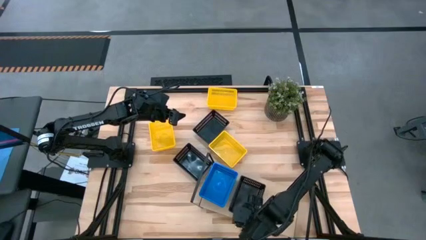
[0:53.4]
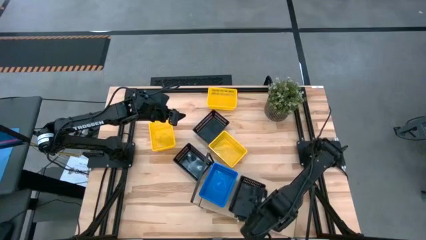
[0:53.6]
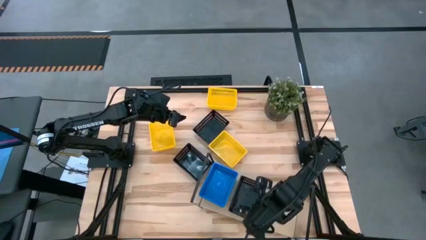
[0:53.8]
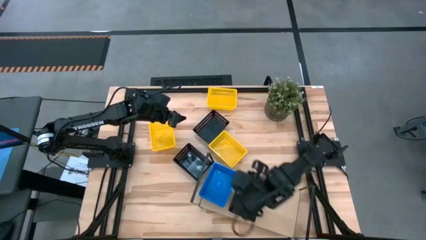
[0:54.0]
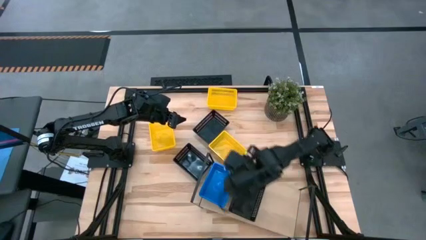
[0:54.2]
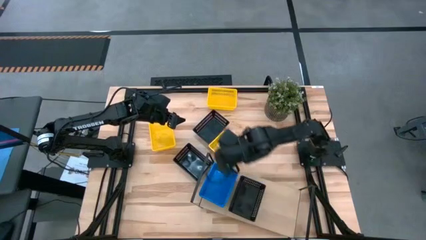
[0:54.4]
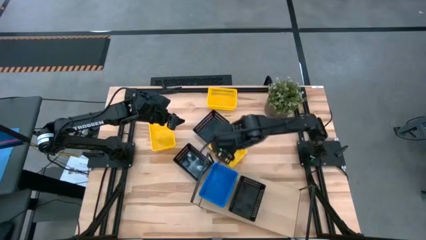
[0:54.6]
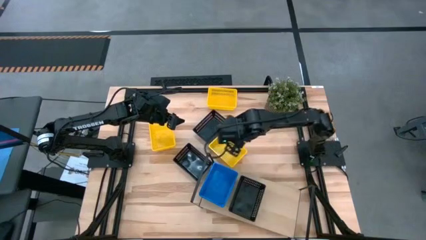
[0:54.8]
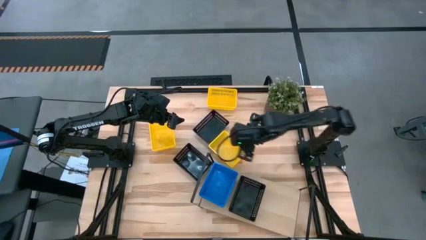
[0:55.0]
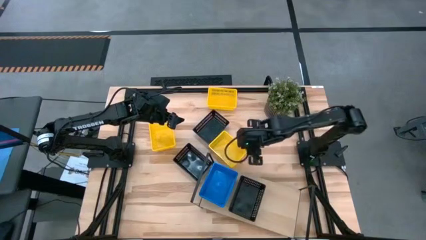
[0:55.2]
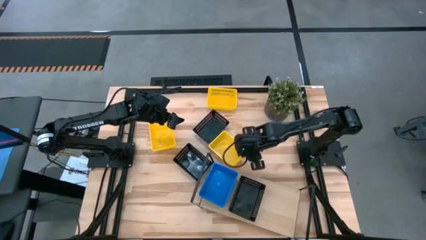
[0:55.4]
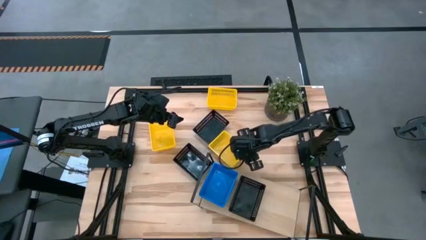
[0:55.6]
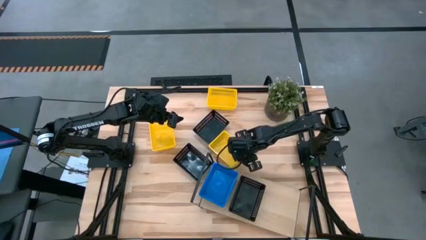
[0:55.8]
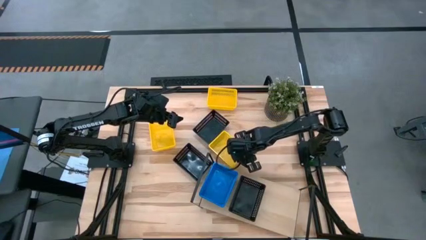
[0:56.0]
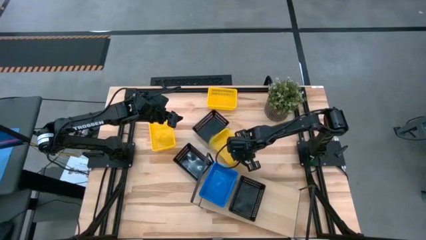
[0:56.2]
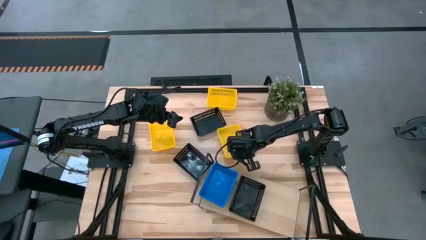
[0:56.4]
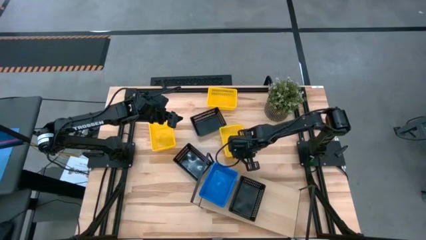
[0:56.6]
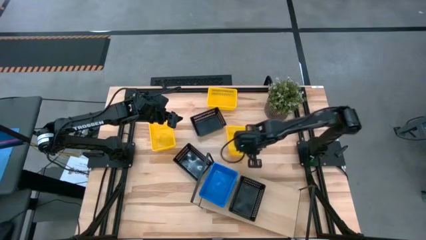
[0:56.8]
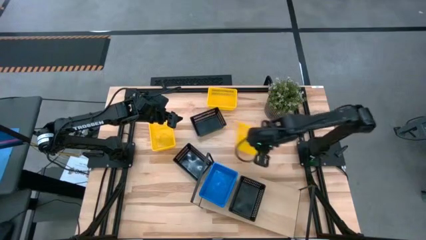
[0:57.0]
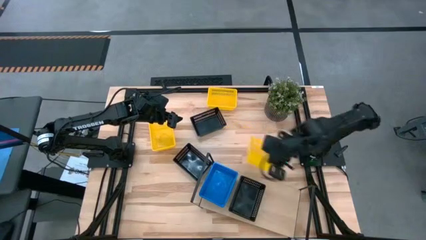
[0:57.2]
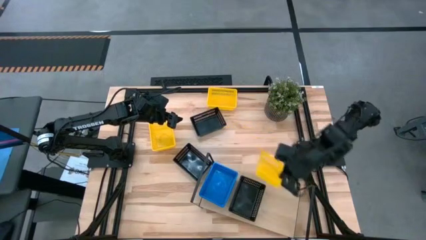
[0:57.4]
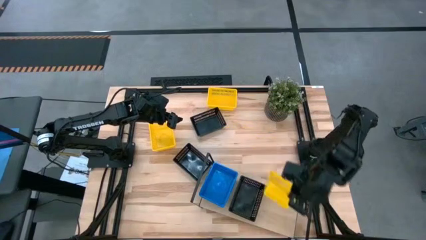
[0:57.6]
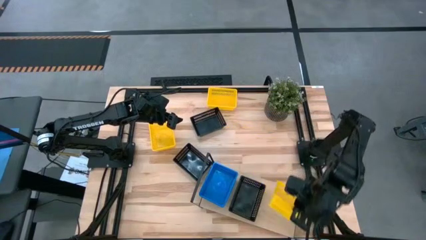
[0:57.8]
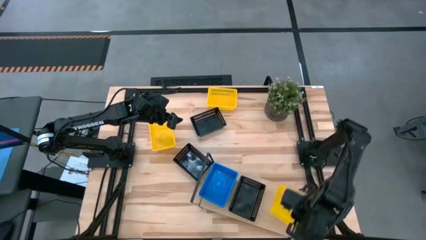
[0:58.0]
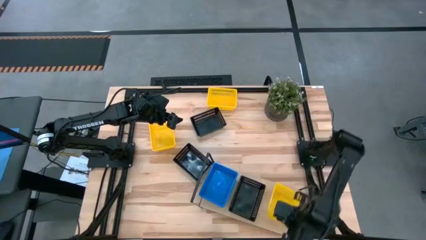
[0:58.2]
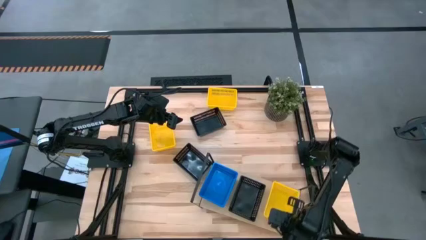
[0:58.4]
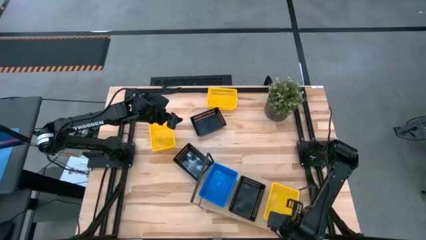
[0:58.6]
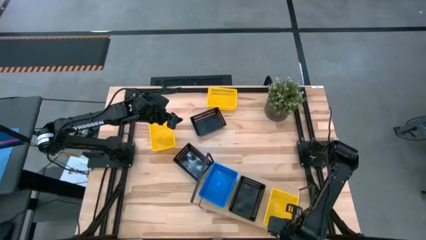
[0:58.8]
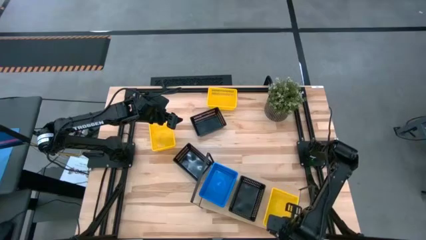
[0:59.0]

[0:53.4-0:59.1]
Task: Stack baskets on shelf by color
Put the bottom right yellow bin on the shelf

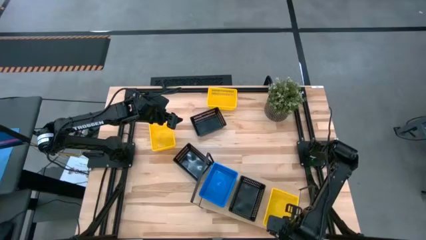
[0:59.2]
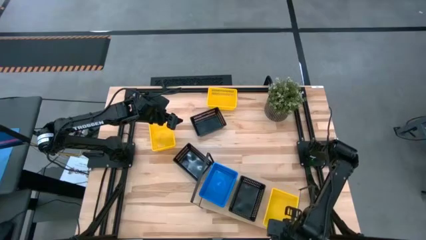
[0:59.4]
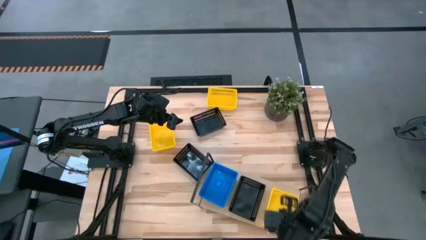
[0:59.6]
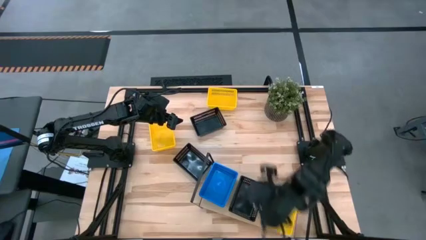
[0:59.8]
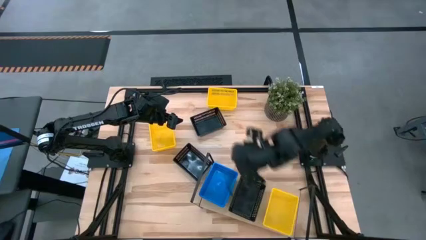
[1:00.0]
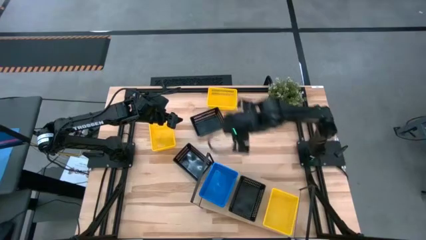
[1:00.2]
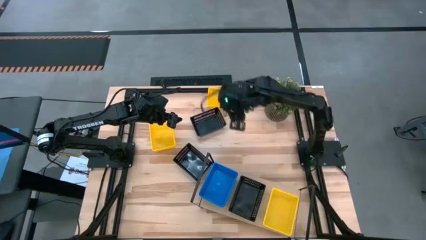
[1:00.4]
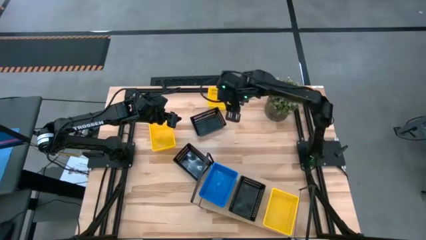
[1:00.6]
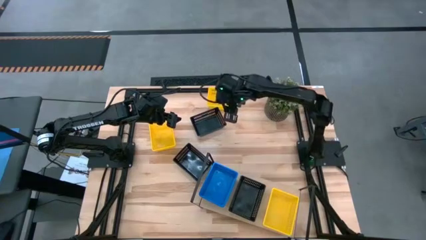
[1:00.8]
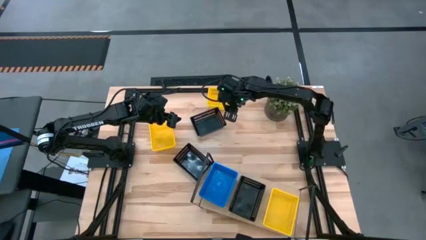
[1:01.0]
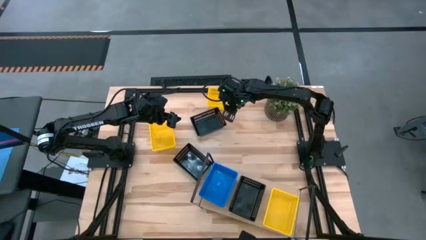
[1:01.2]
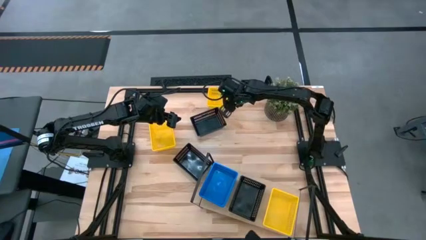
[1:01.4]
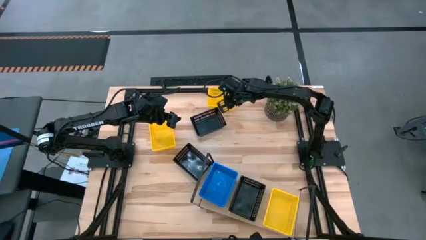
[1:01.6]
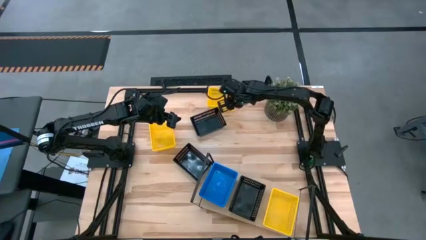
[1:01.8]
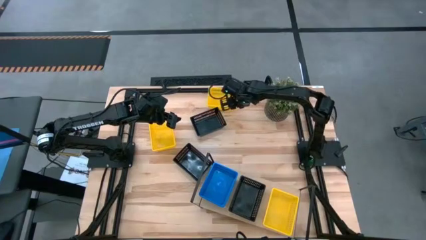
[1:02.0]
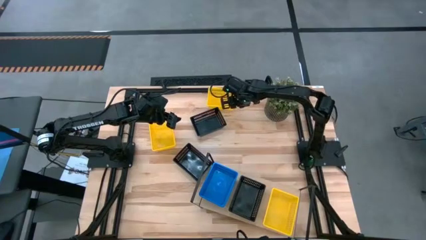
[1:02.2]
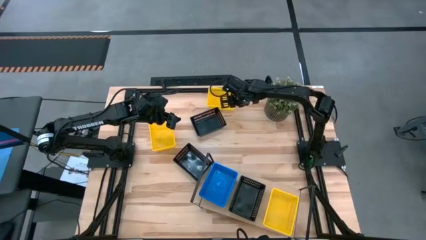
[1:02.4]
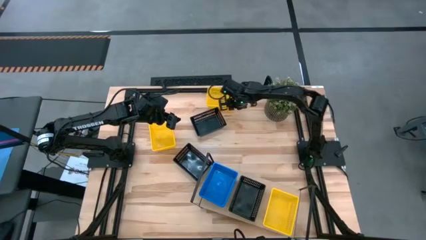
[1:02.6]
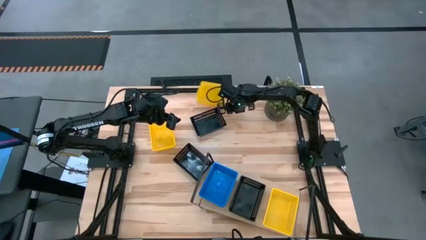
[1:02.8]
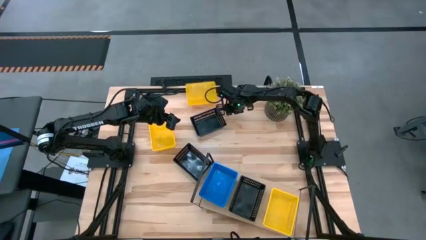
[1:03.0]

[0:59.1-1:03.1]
Stack the top yellow bin on top of the yellow bin on the shelf

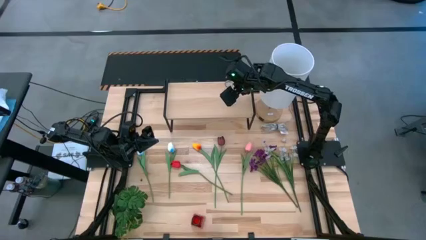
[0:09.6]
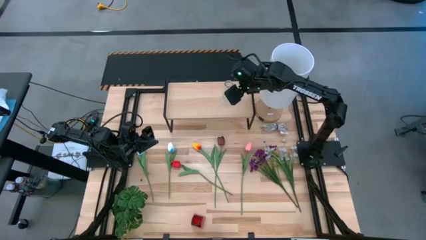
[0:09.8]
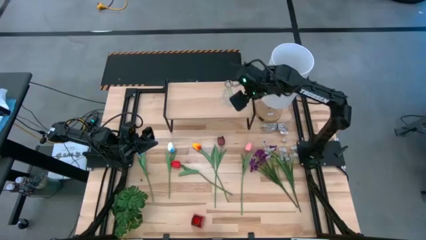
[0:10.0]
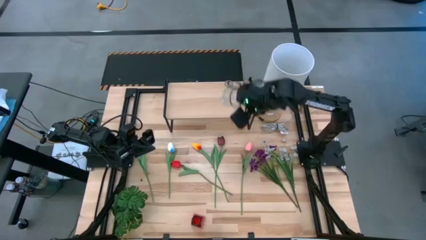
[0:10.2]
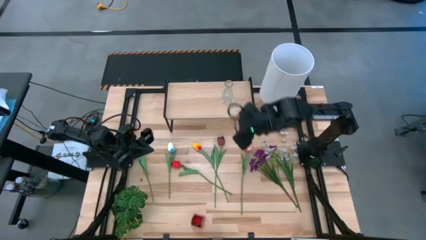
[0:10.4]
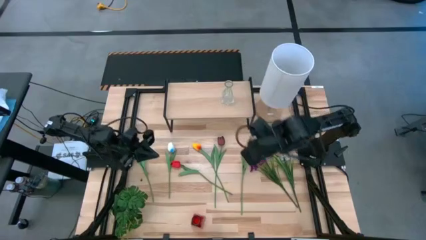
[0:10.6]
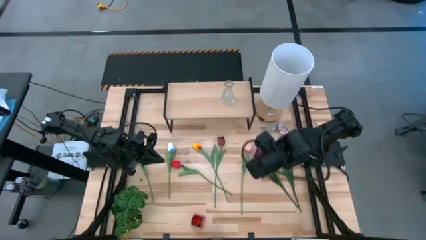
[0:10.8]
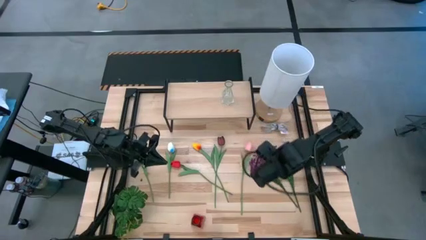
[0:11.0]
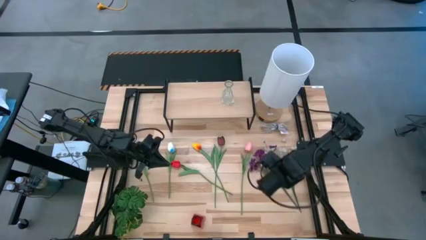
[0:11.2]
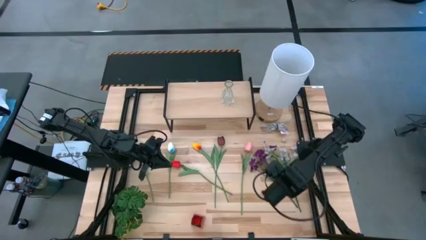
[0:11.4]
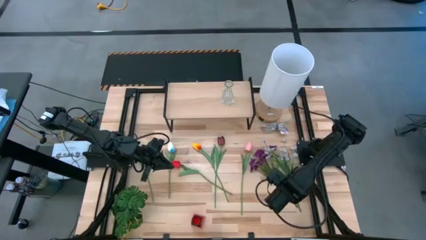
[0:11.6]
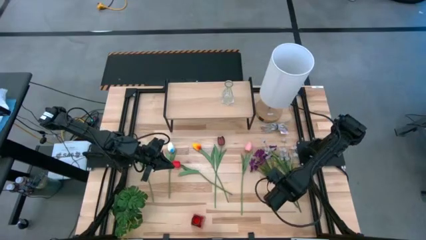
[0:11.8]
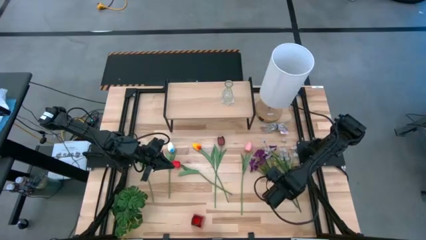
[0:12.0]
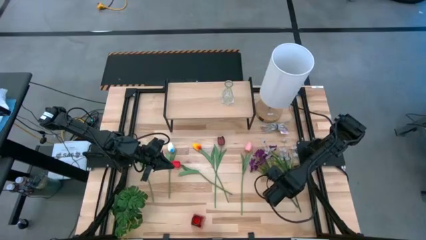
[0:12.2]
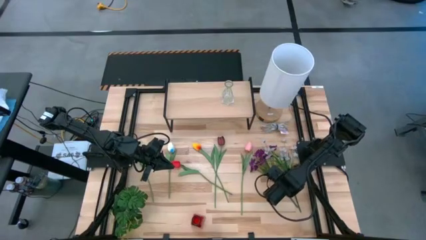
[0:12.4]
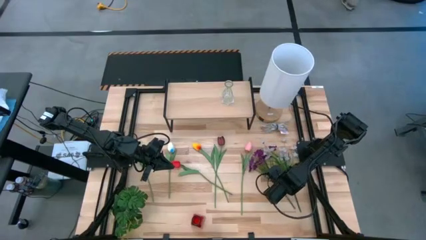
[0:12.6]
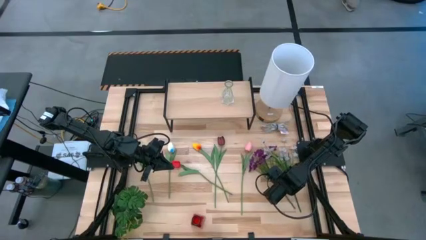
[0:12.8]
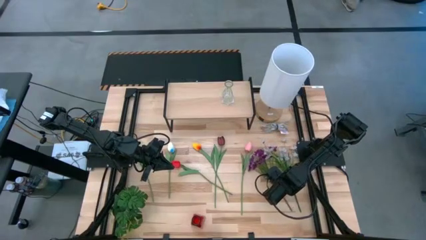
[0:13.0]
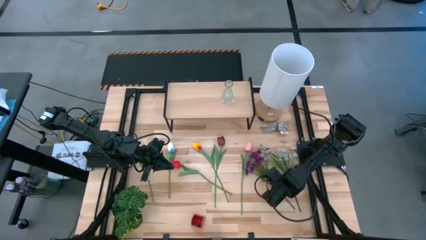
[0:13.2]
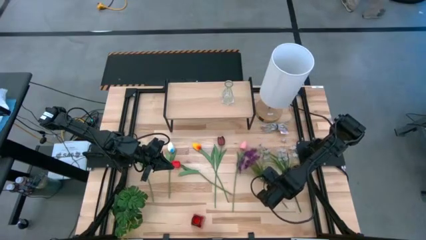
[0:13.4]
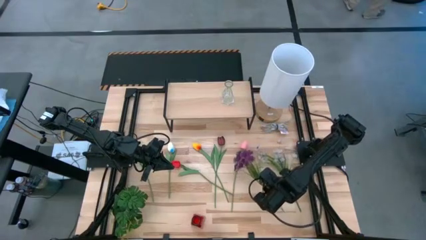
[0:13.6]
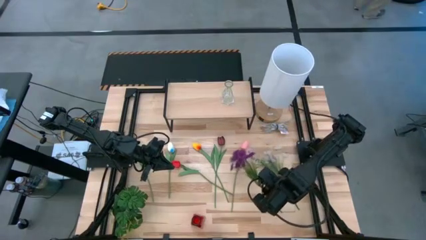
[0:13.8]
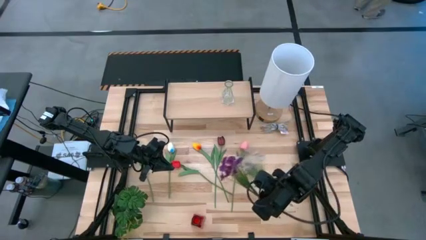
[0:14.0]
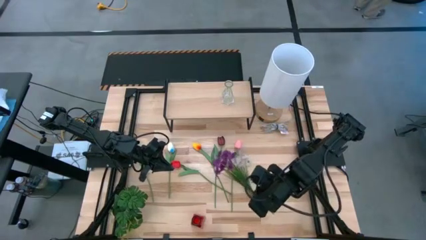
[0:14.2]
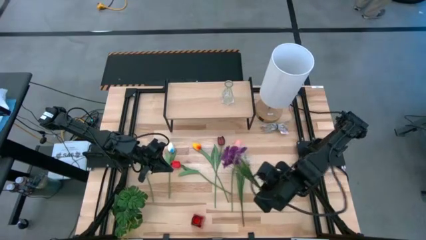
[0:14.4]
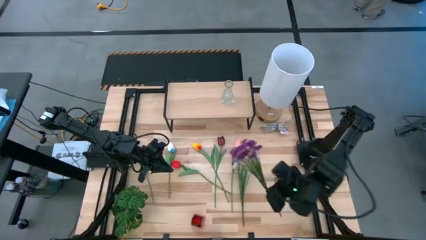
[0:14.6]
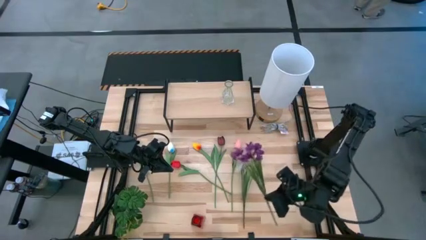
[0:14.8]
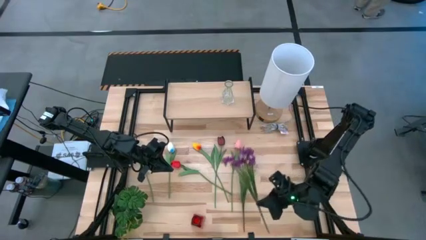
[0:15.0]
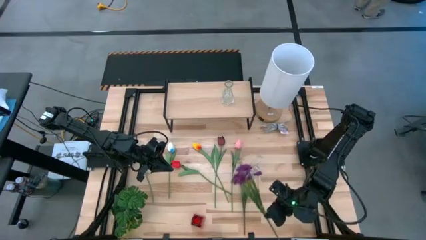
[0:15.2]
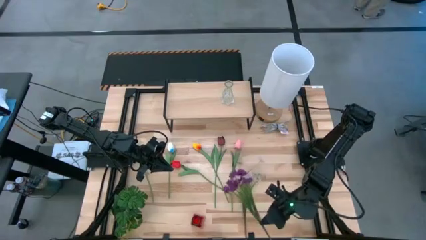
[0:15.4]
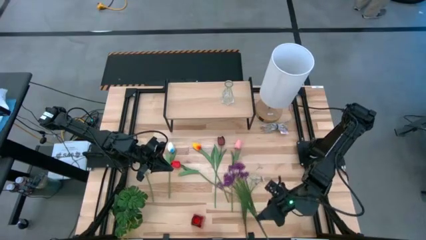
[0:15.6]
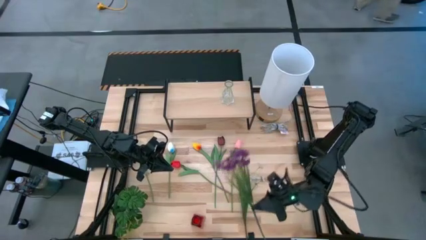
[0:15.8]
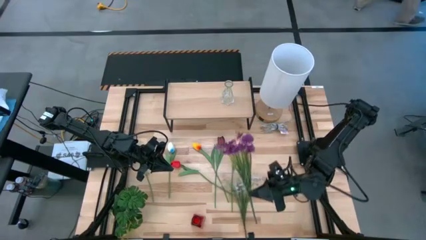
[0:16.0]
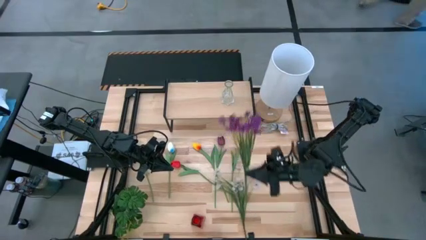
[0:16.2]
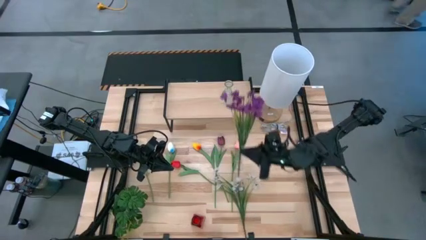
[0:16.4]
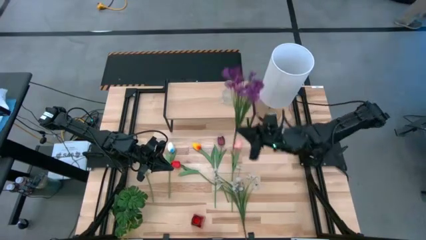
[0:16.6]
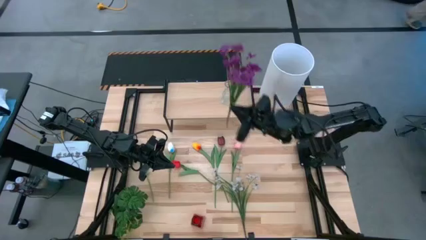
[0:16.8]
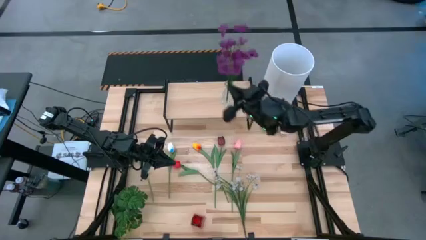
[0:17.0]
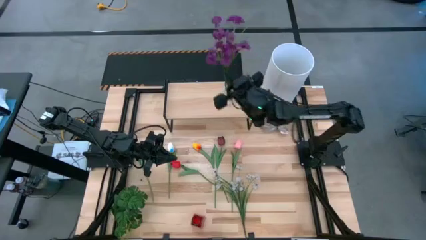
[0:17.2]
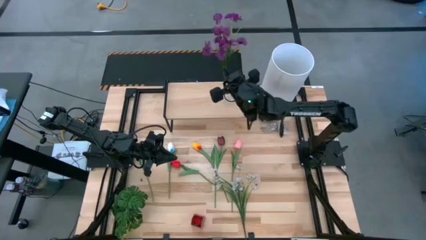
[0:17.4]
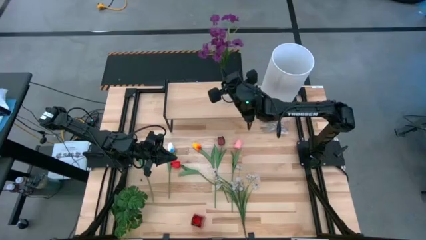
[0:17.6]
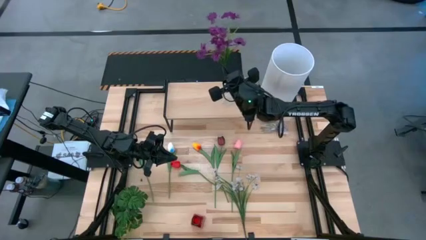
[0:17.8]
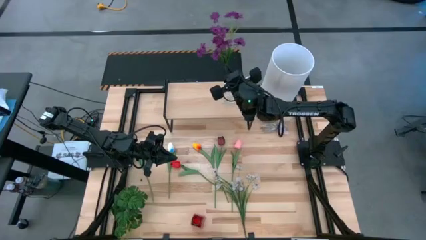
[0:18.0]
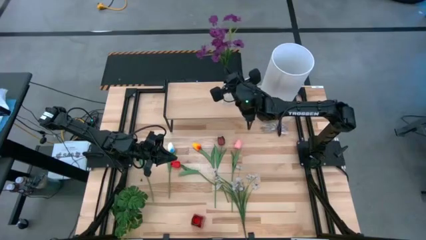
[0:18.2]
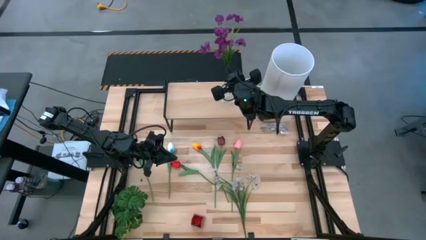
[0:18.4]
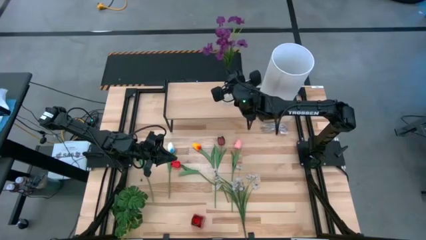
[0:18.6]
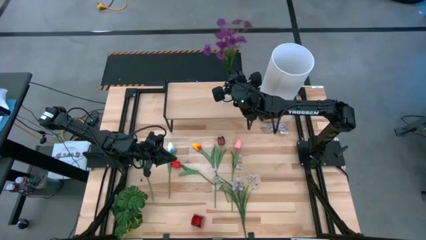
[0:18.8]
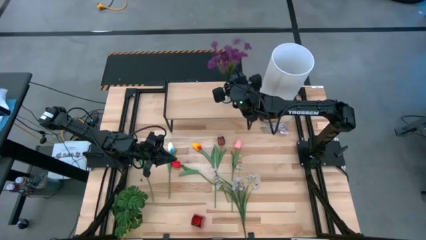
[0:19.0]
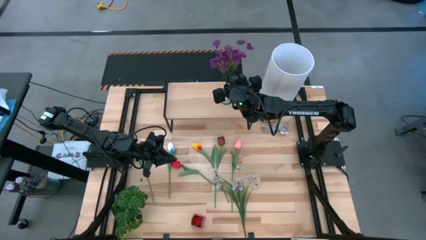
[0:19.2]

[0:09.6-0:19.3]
Task: Pick and place flowers into a vace then onto a shelf
Put the purple flowers into the transparent vase on the shelf
